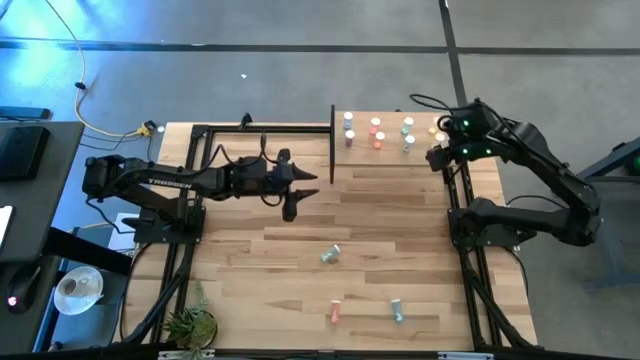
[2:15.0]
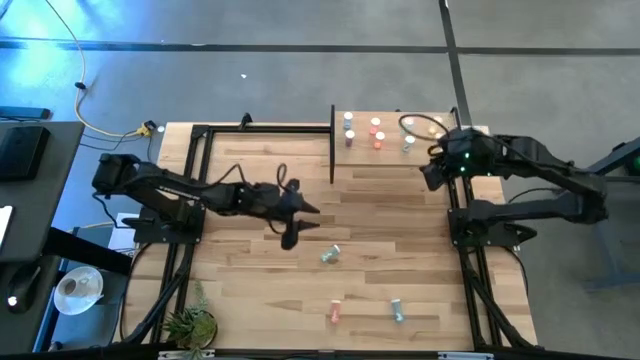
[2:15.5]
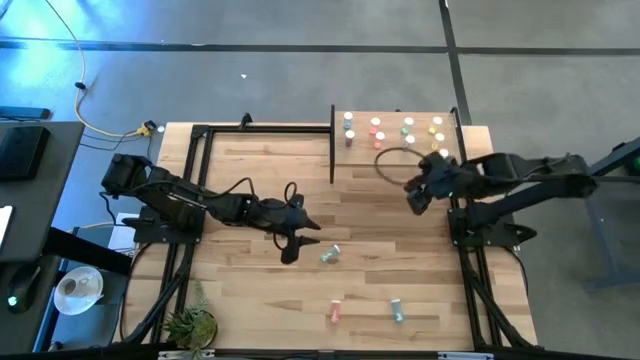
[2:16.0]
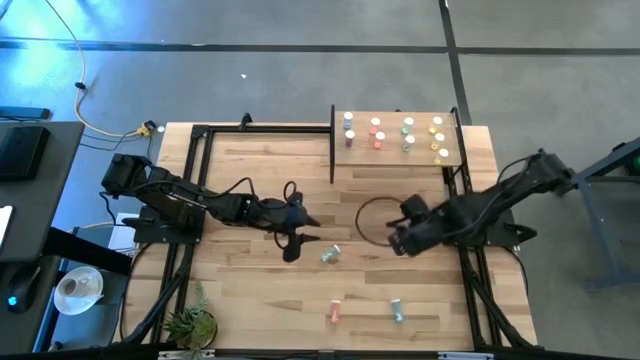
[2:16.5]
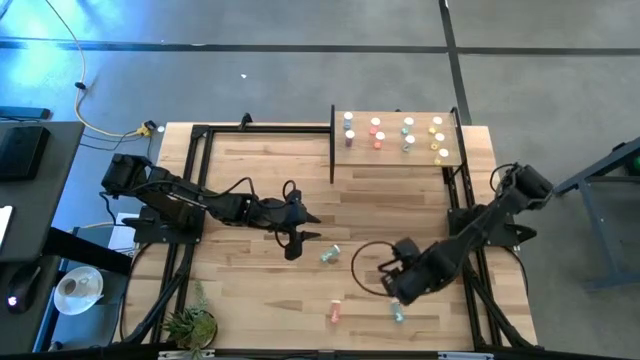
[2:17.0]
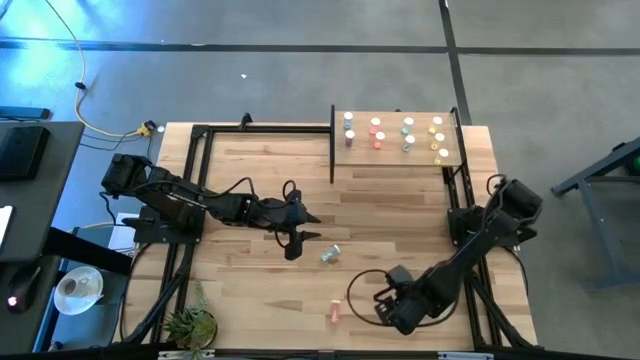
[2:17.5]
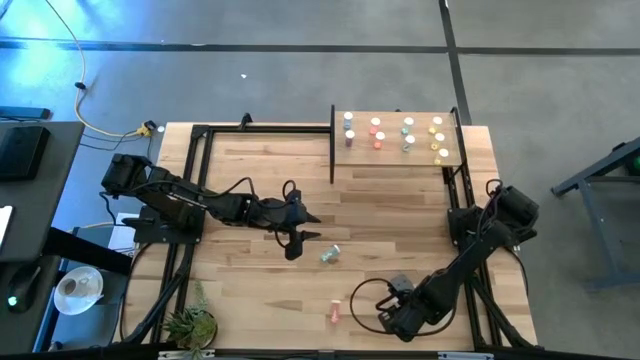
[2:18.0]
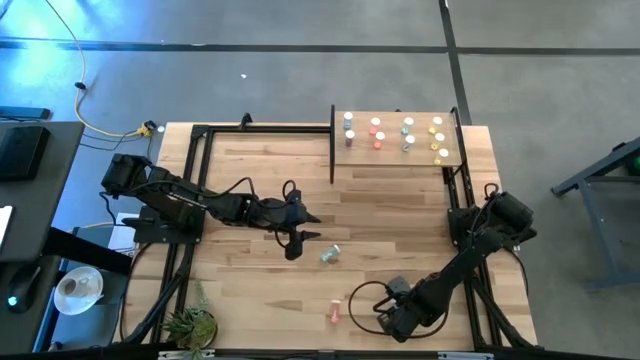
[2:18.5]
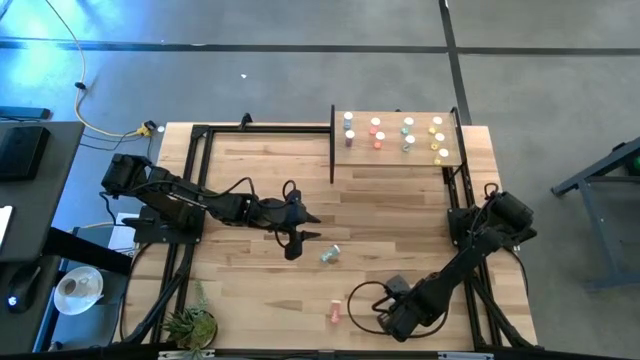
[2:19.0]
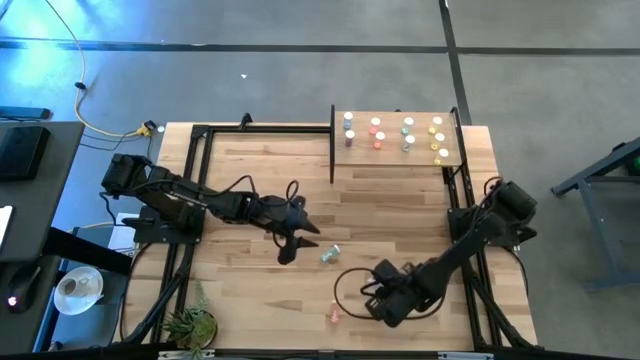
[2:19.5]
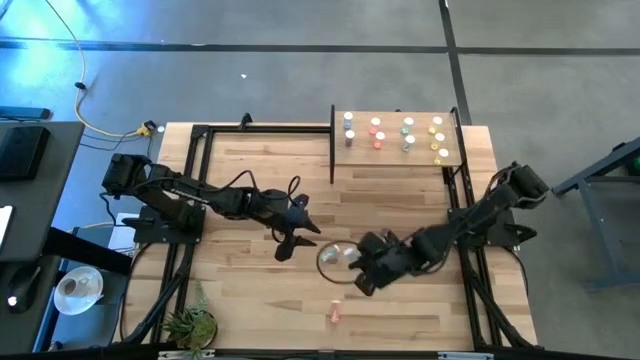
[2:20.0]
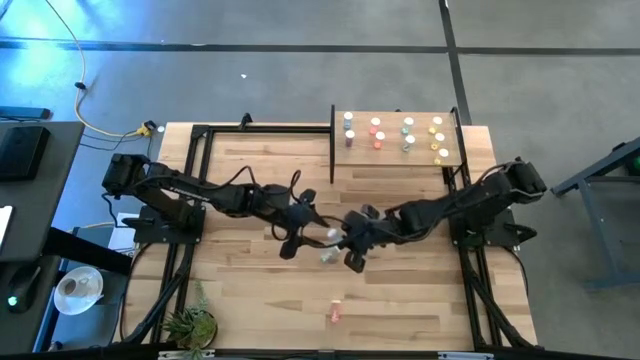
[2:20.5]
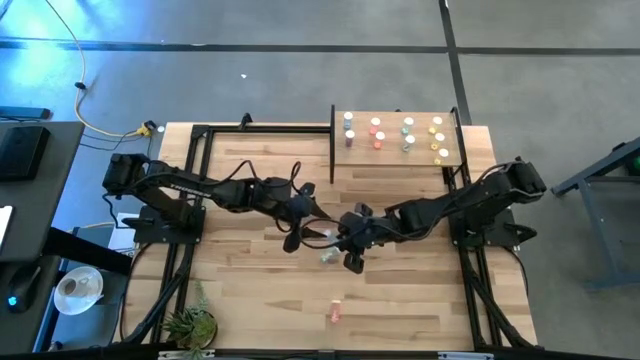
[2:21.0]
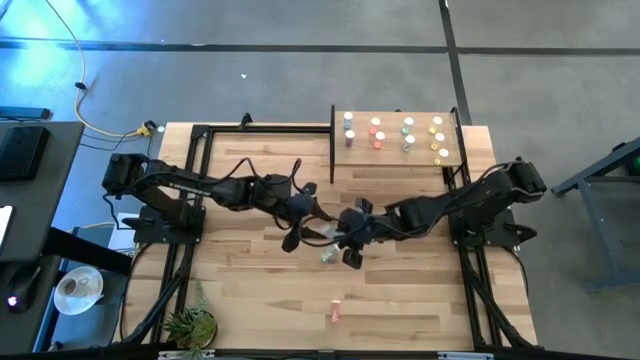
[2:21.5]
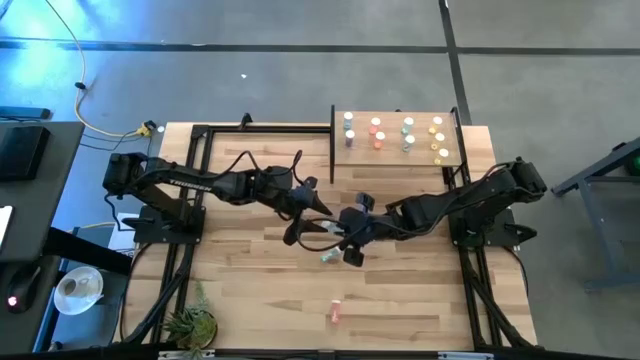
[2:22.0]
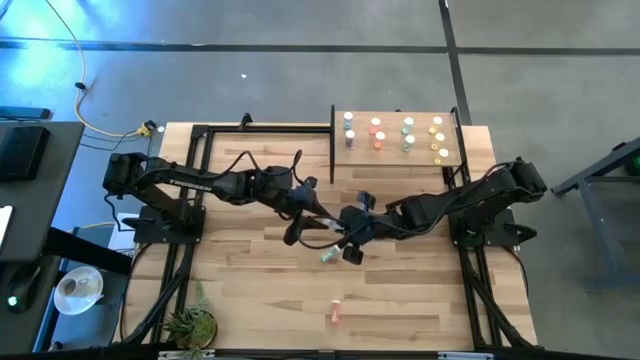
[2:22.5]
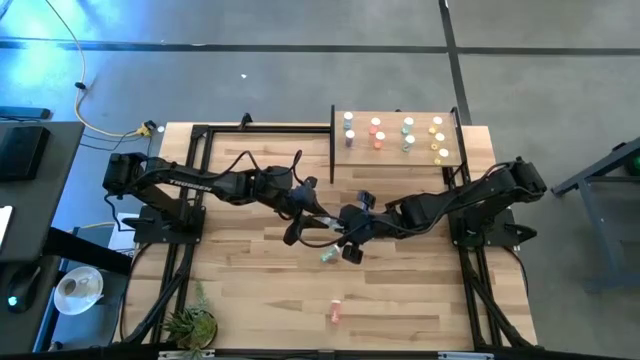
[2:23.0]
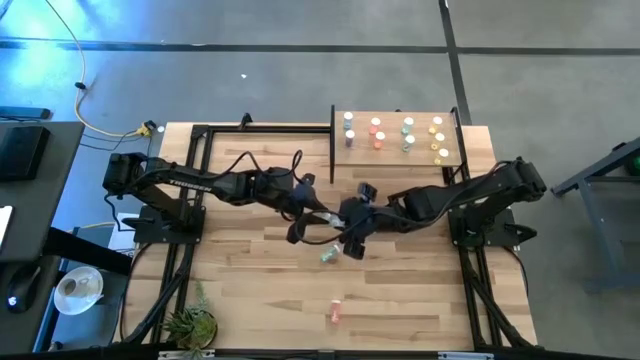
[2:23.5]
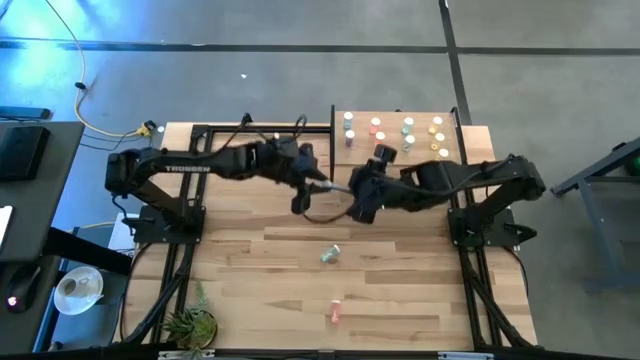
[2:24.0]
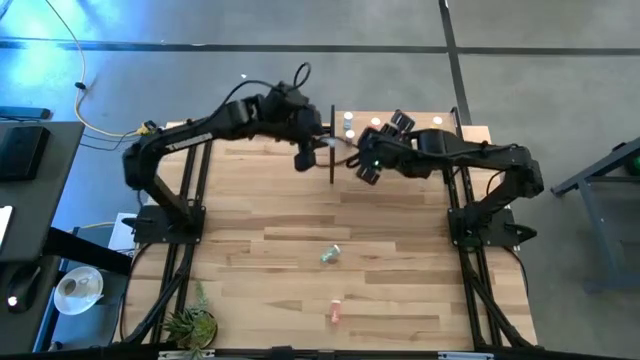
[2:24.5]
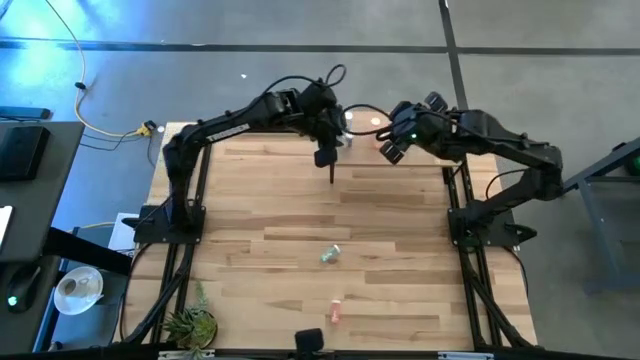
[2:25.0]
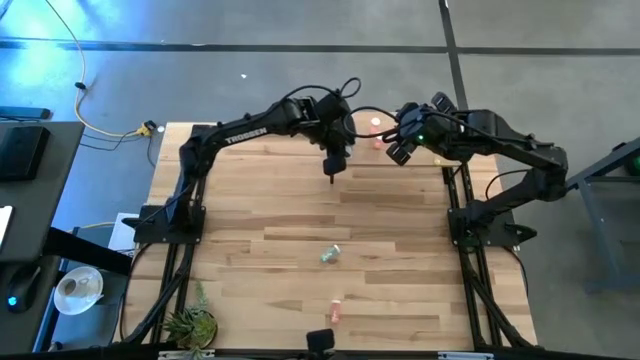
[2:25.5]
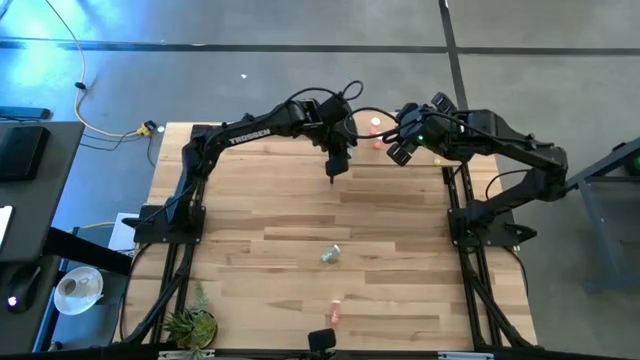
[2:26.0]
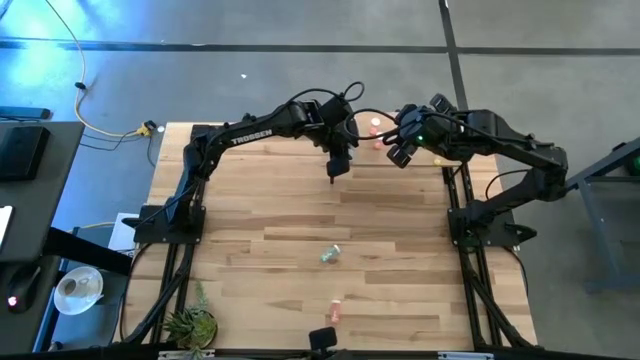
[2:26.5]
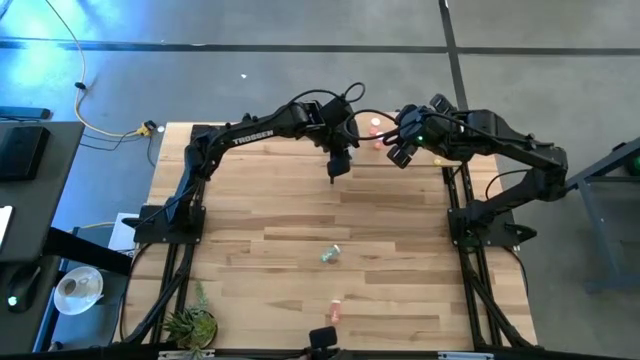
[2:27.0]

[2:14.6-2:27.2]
Task: Pick and place medicine bottles onto shelf by color
Put the blue pill bottle on the shelf aligned with the blue pill bottle

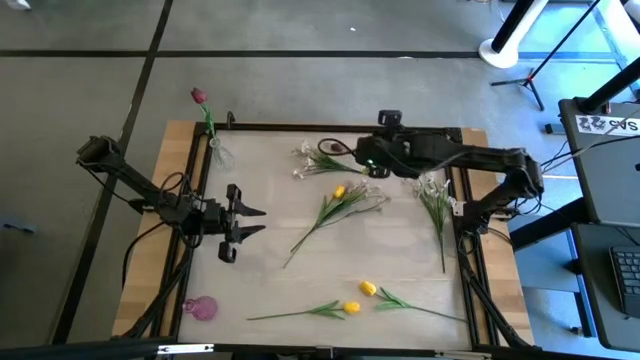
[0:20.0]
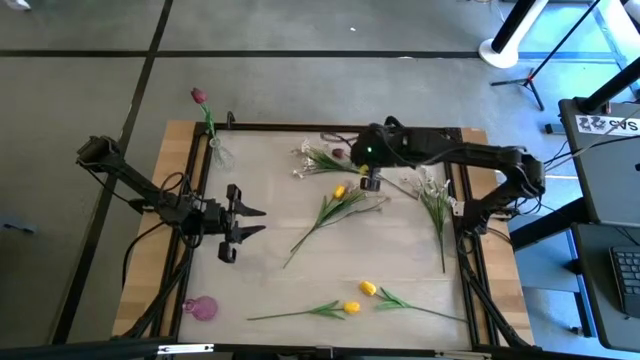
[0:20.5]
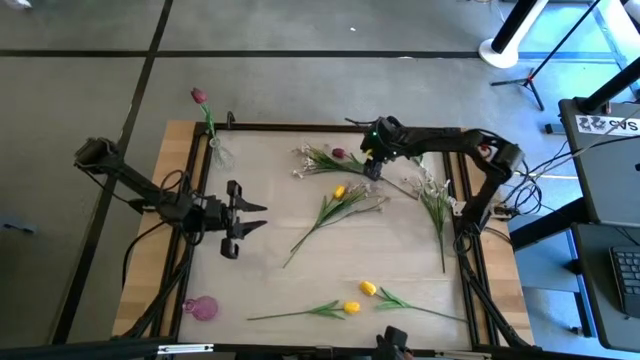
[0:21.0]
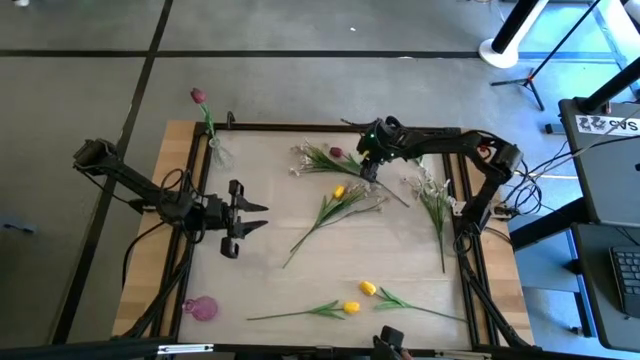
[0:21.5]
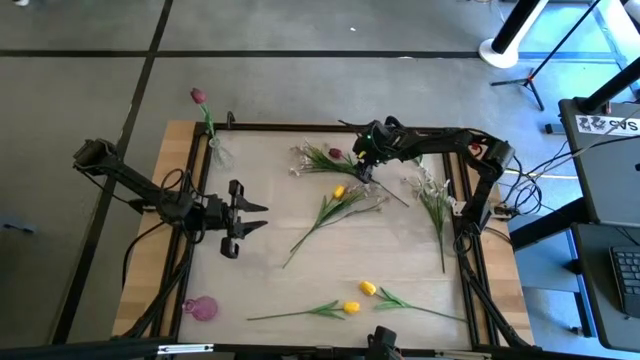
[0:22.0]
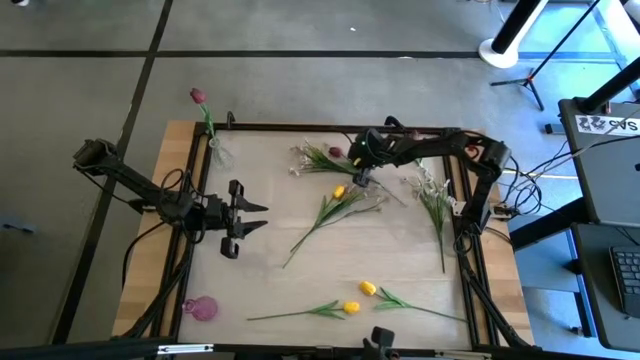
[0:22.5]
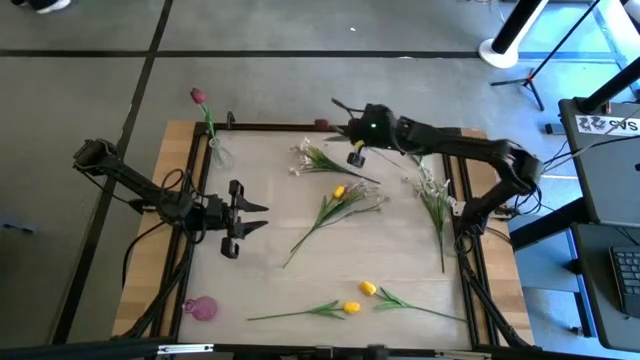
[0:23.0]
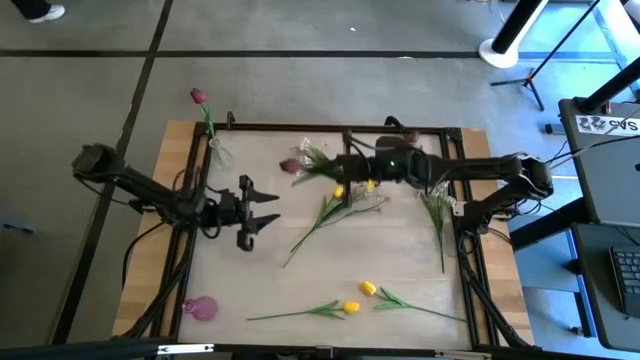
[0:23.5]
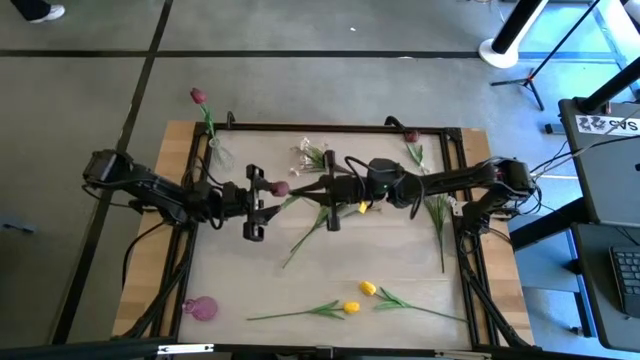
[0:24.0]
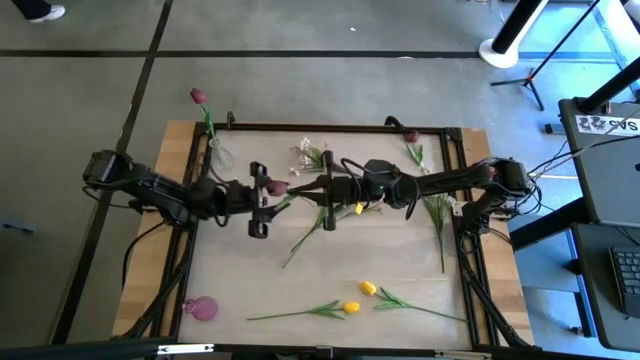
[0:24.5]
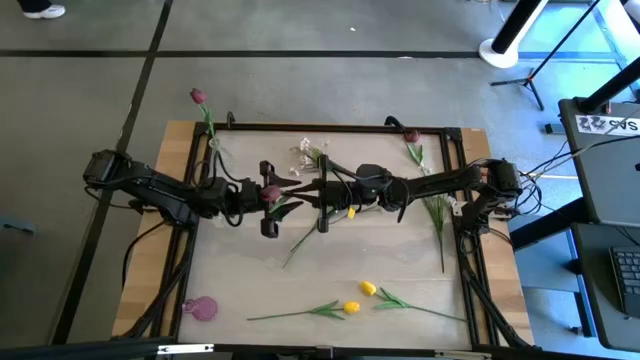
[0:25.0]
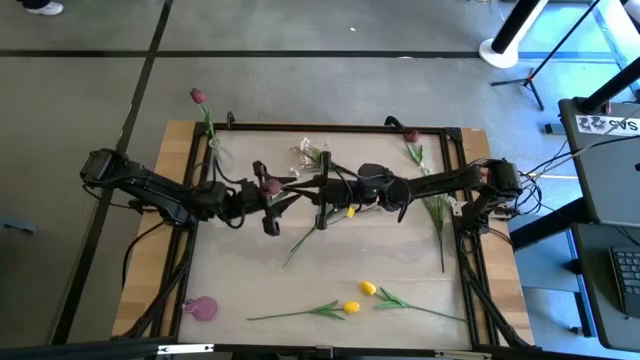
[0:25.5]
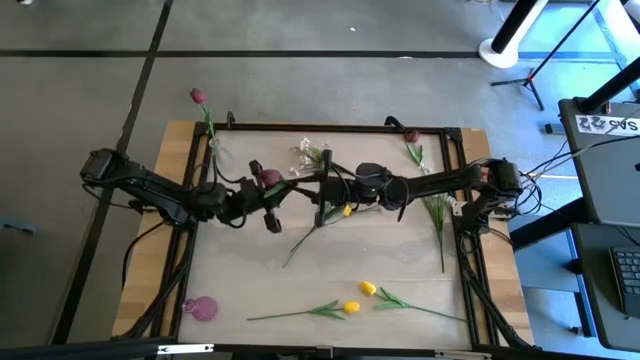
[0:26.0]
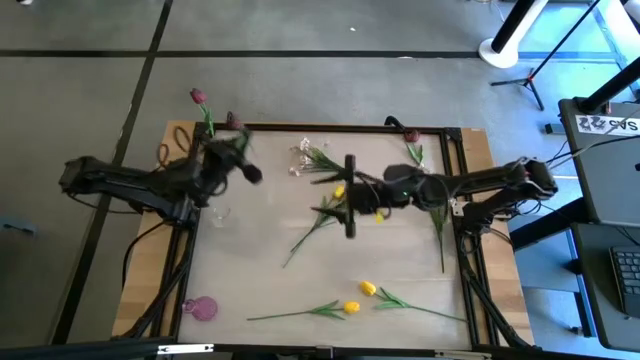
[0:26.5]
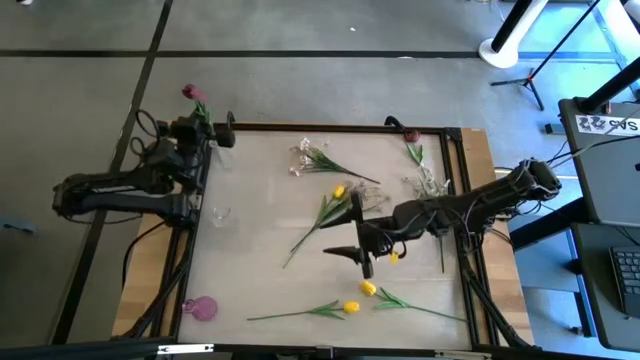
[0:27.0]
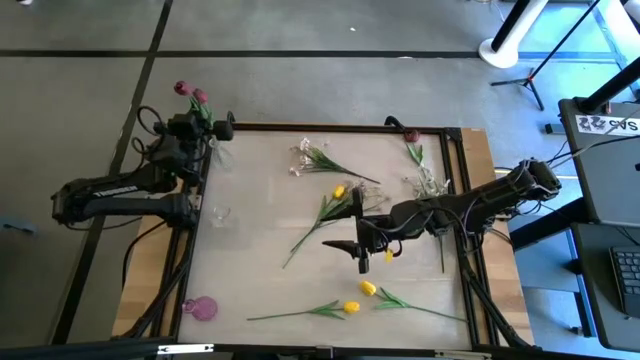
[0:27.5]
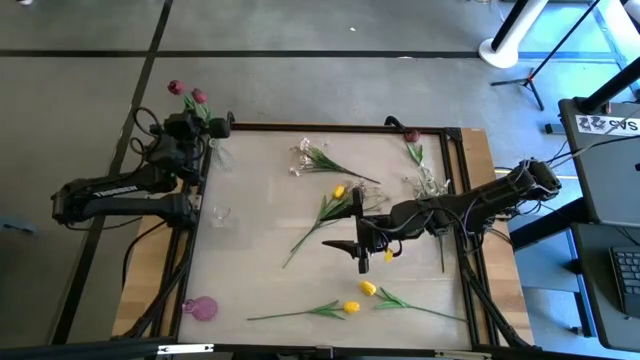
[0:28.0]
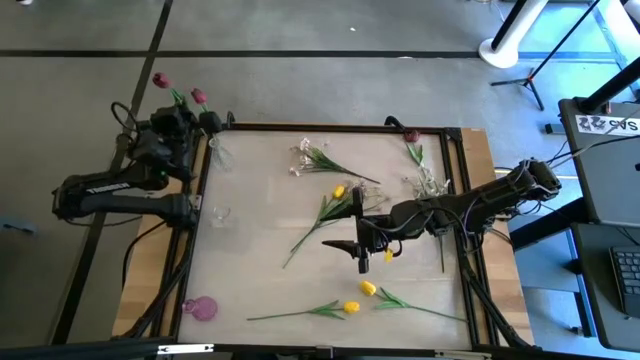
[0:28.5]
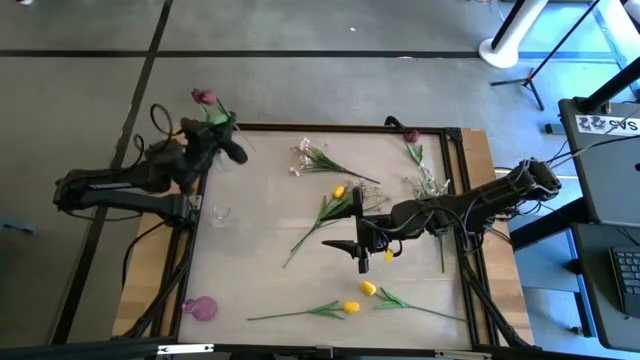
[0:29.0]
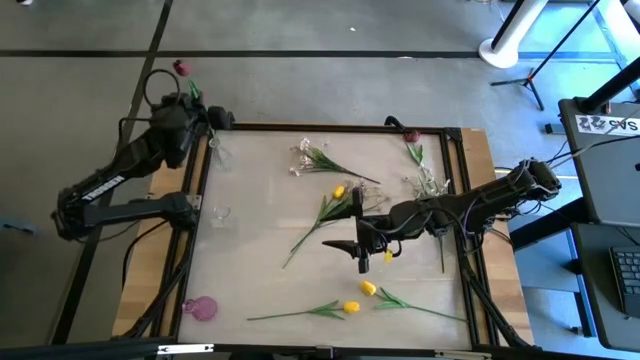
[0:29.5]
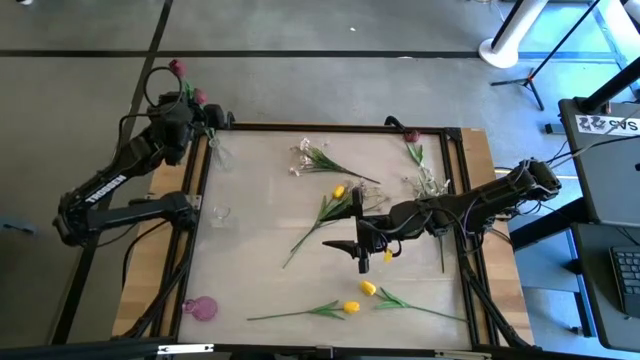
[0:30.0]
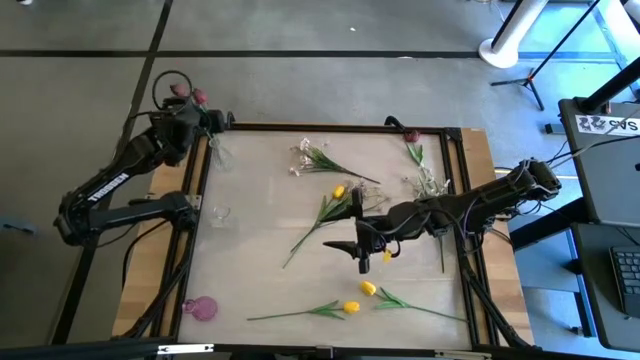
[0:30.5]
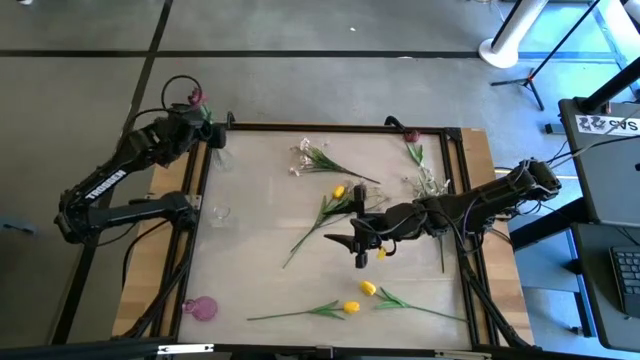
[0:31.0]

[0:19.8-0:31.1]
Task: Sort flowers into vase by color
Put the left red flower into the top transparent vase
